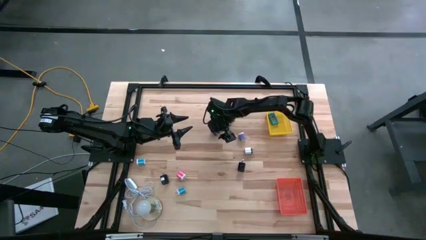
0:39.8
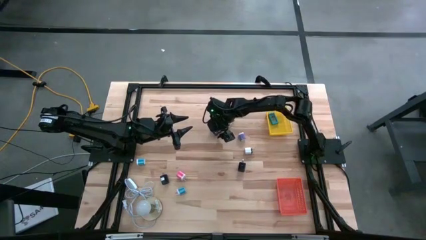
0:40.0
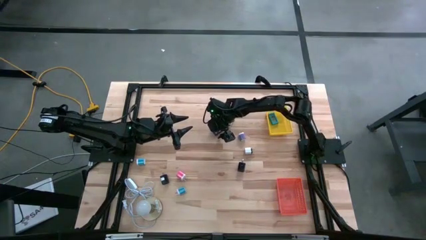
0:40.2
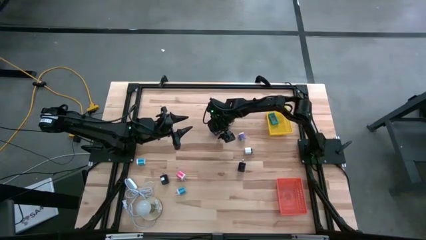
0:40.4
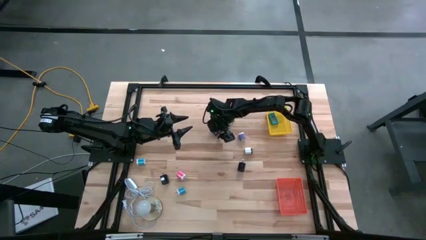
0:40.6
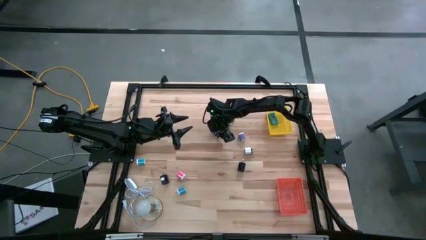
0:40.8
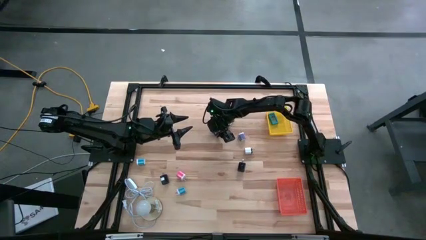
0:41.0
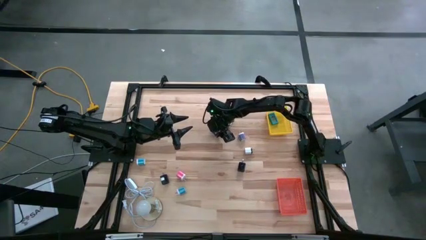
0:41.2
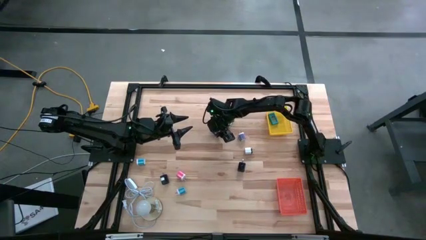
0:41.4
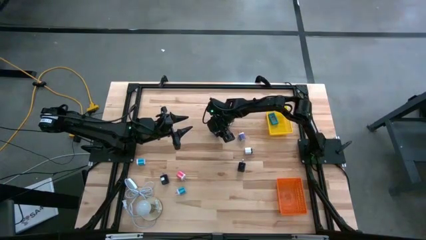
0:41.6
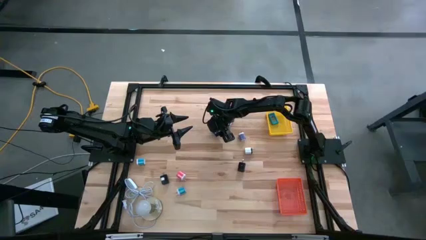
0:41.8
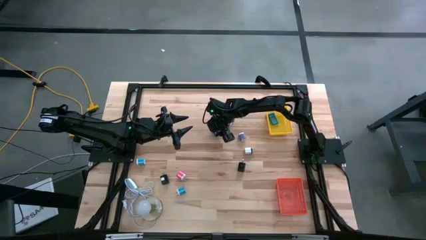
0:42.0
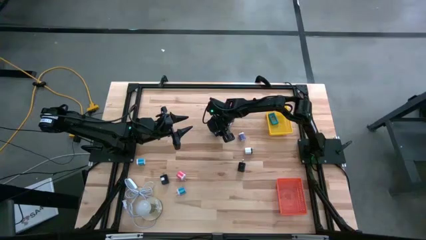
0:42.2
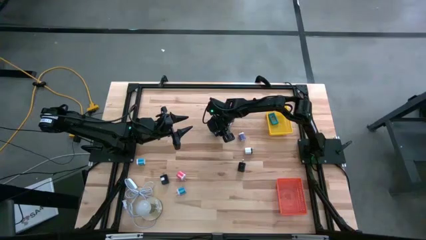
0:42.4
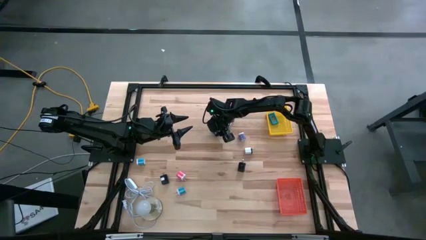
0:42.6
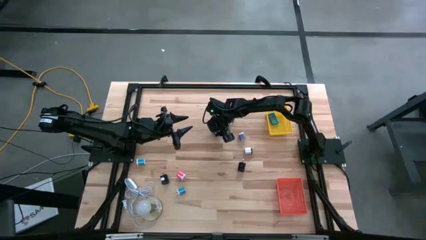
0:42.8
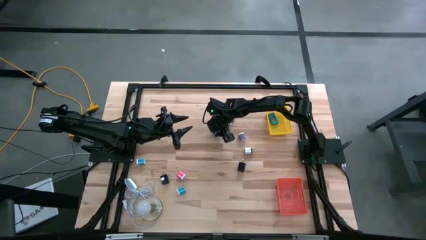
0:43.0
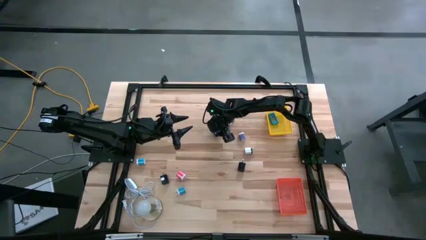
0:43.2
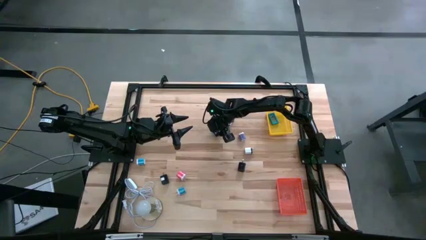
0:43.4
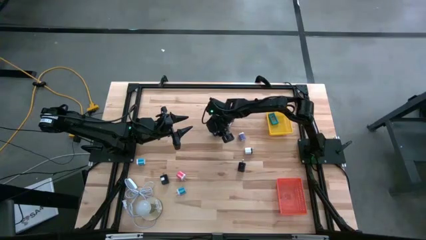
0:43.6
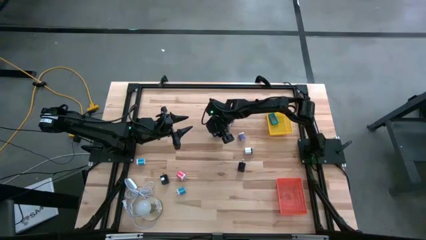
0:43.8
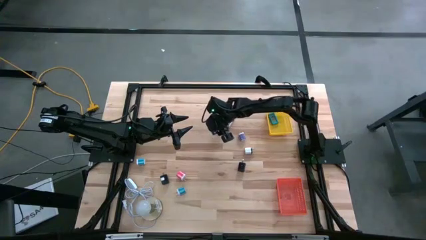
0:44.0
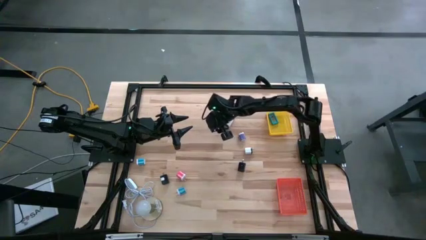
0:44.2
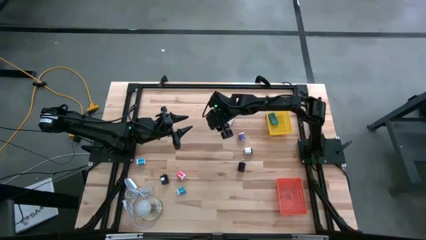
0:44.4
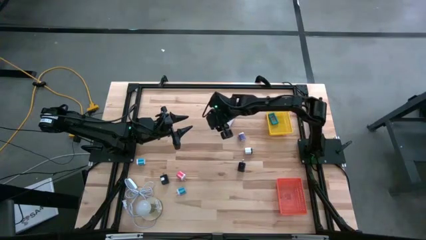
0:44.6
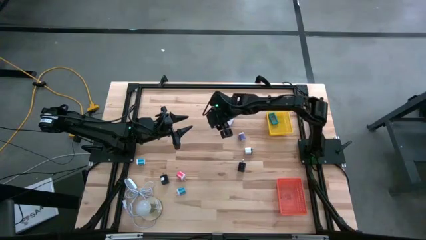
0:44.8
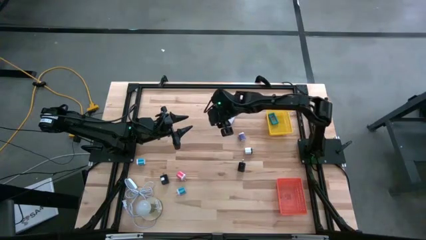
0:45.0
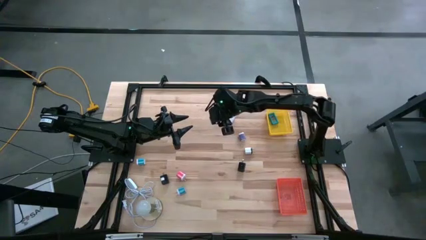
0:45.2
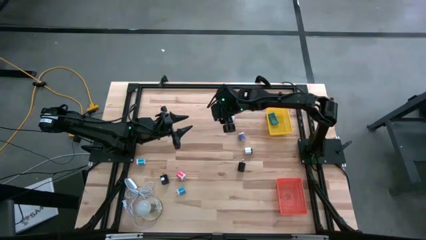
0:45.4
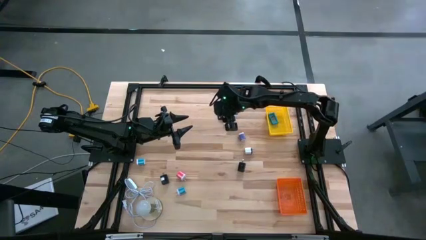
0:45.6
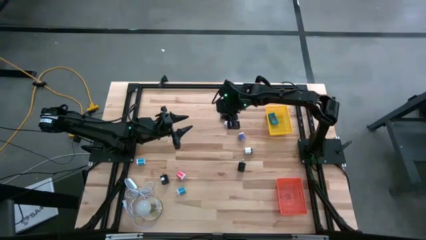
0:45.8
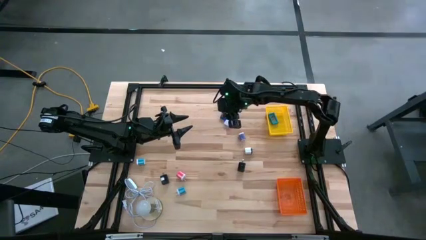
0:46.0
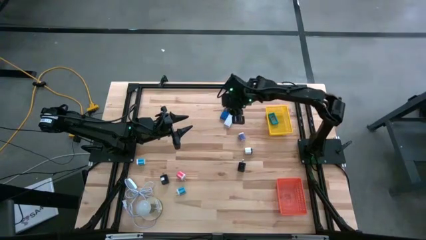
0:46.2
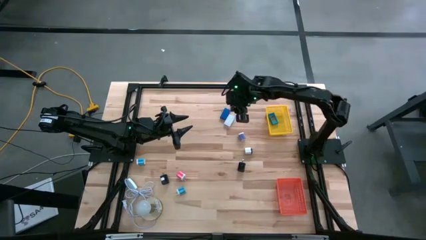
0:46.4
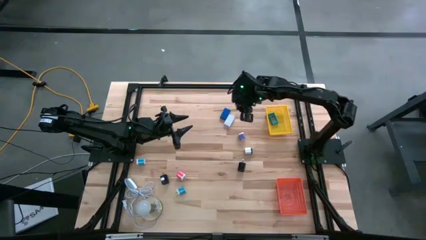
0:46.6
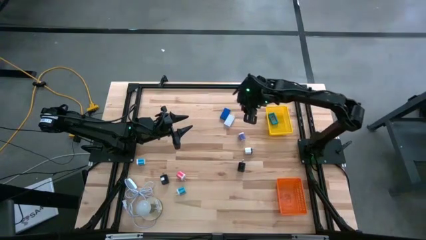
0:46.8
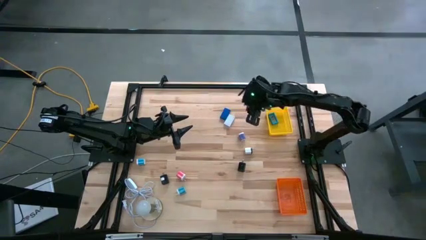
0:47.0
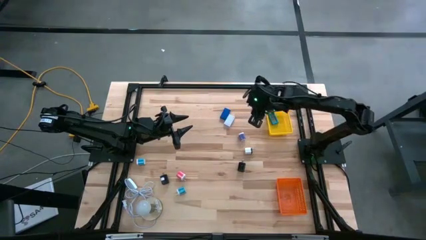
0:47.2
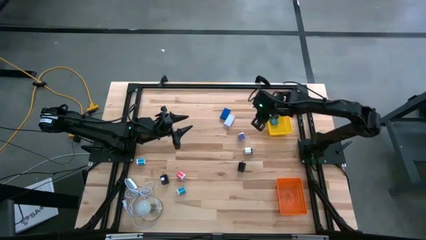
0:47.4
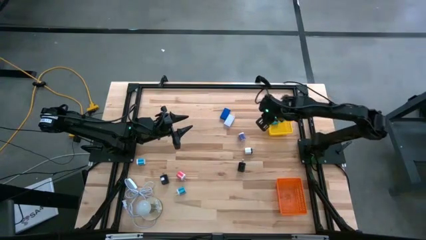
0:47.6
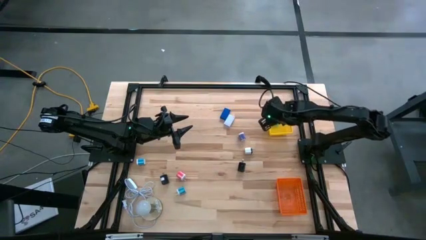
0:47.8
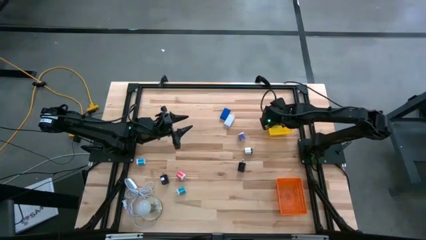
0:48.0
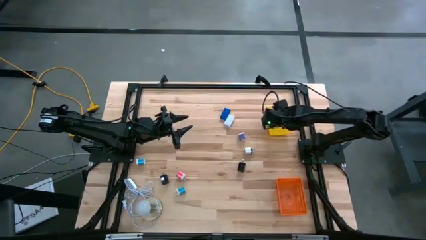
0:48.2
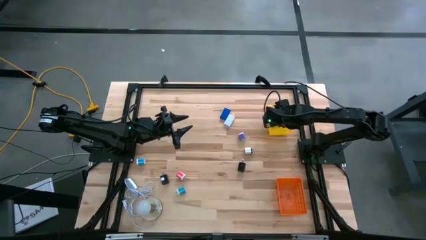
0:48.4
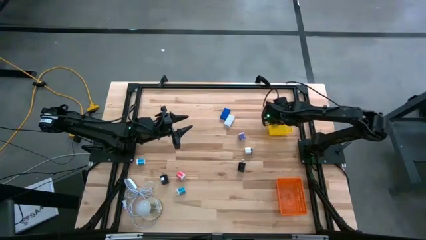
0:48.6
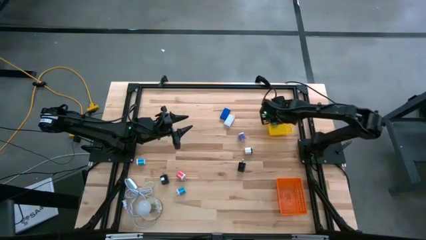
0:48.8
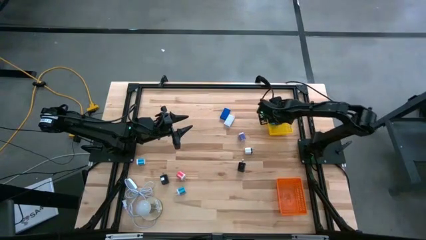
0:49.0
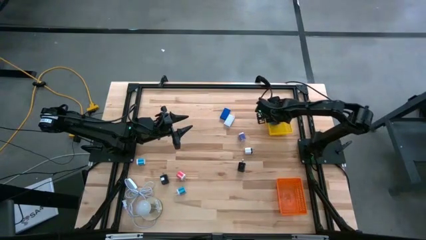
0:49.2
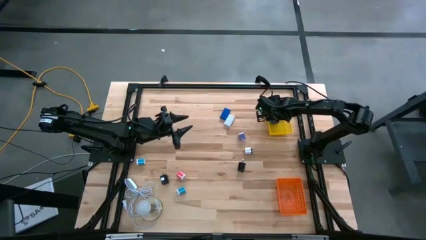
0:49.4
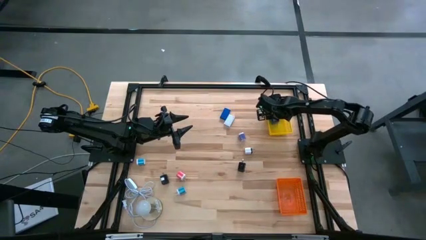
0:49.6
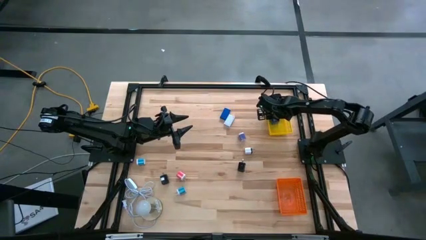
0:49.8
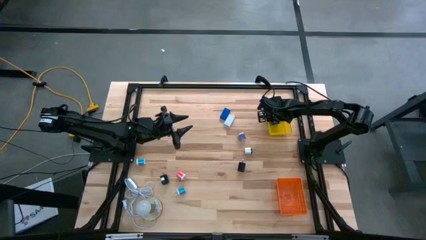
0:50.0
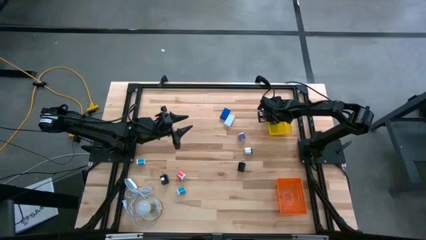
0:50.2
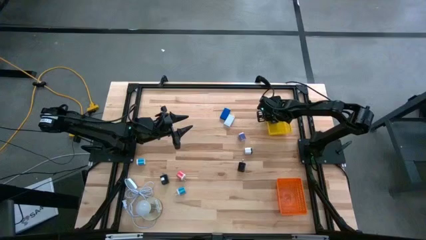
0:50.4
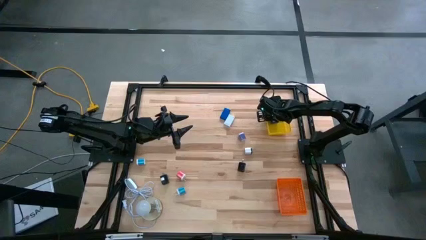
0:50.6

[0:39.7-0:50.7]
Task: Pick & Place Office items
Put the dark blue digital clock into the yellow bin
